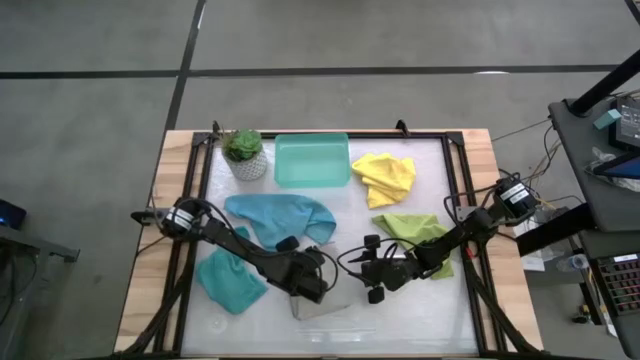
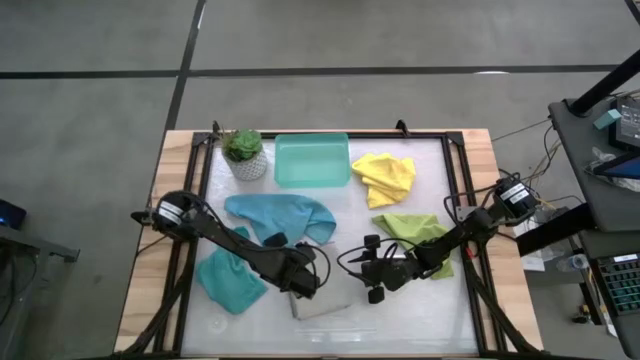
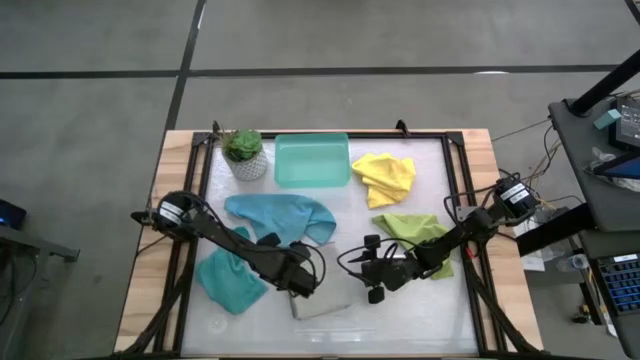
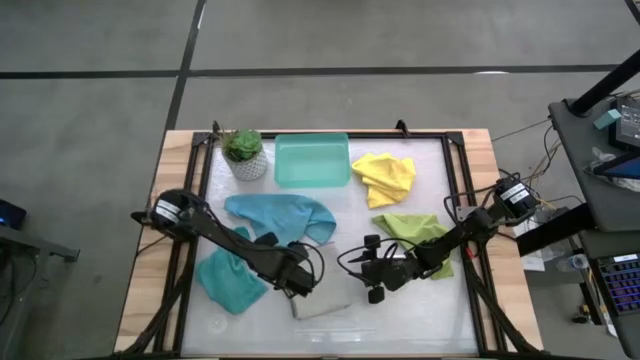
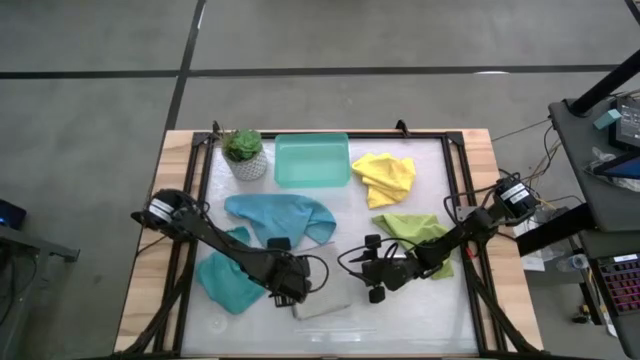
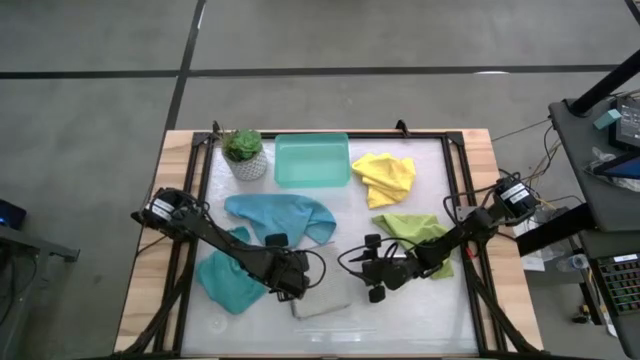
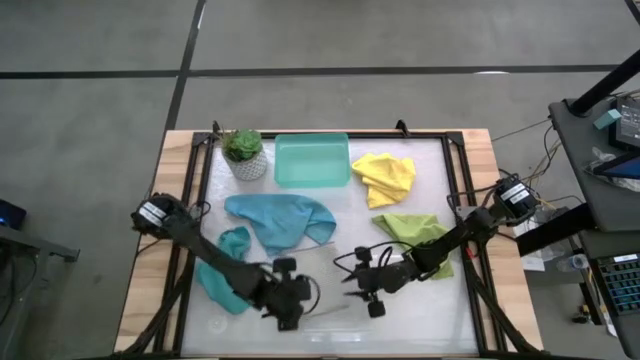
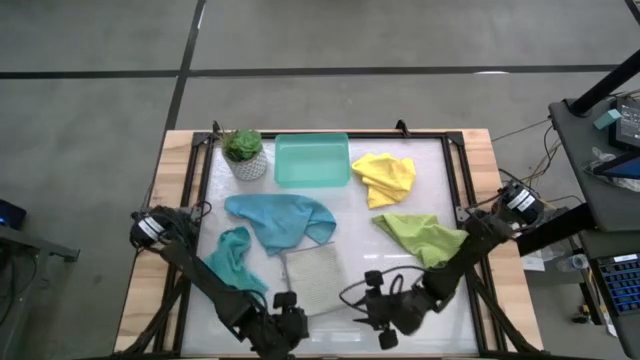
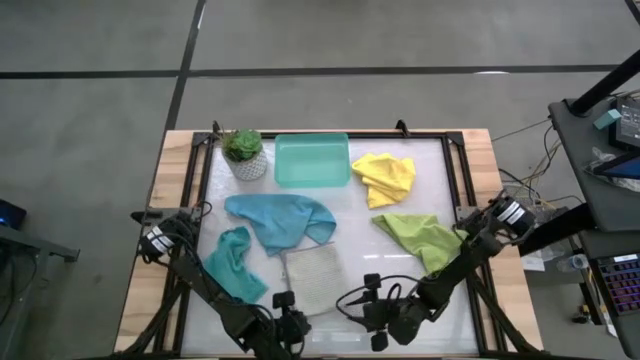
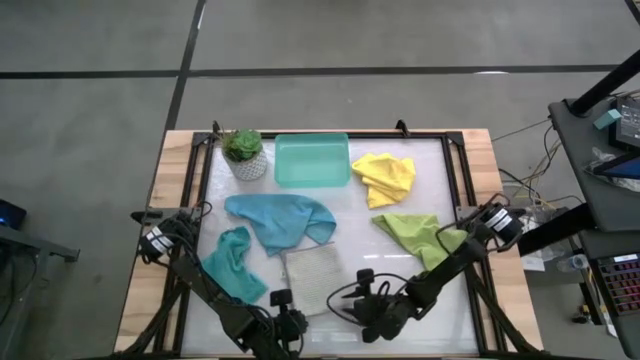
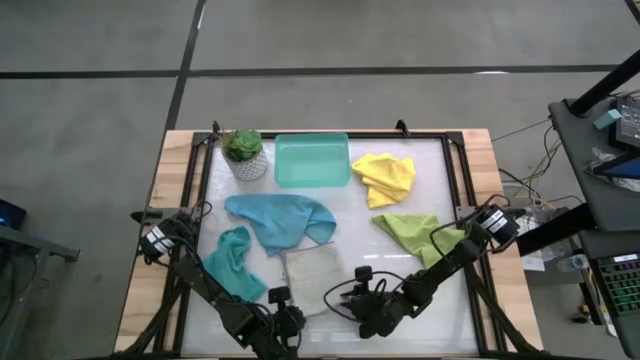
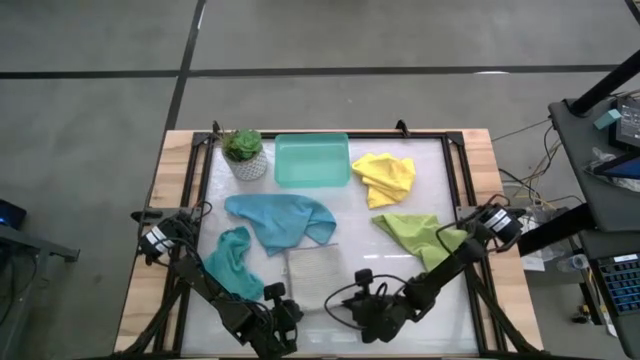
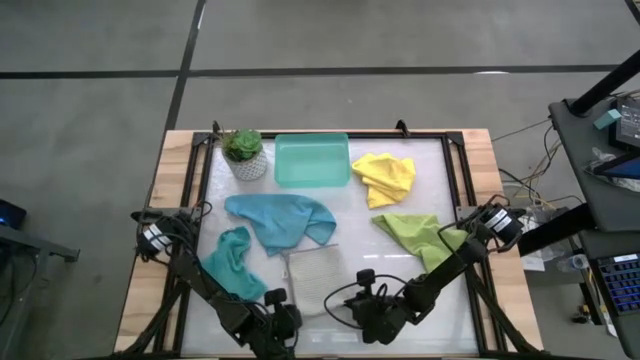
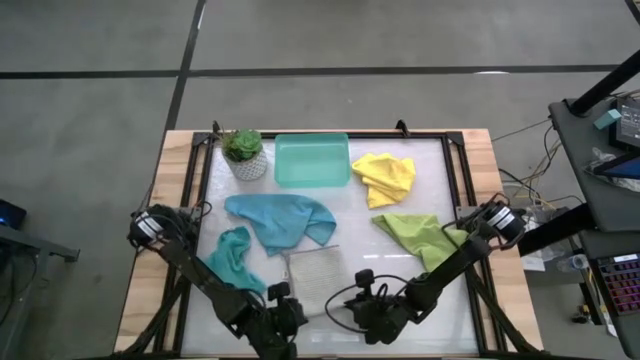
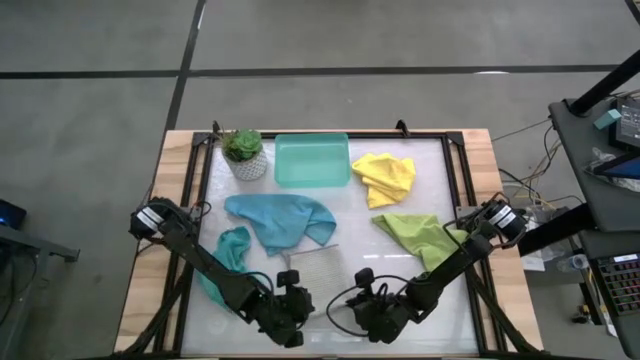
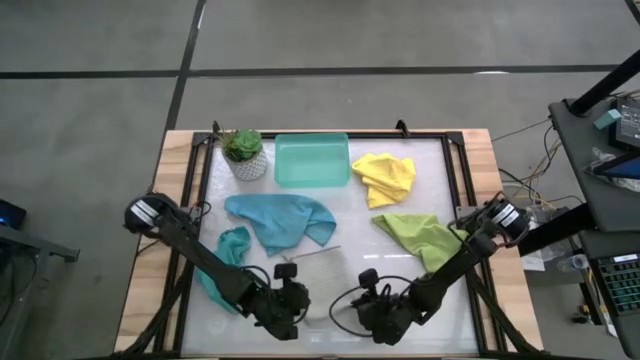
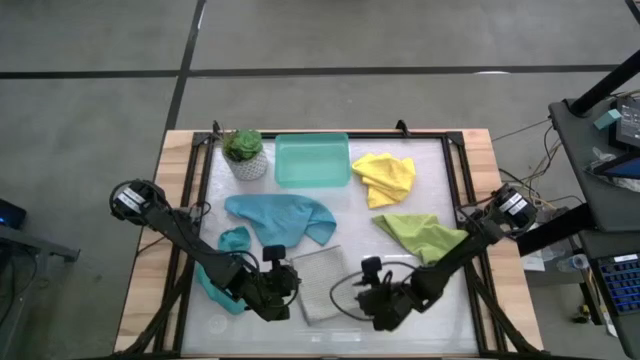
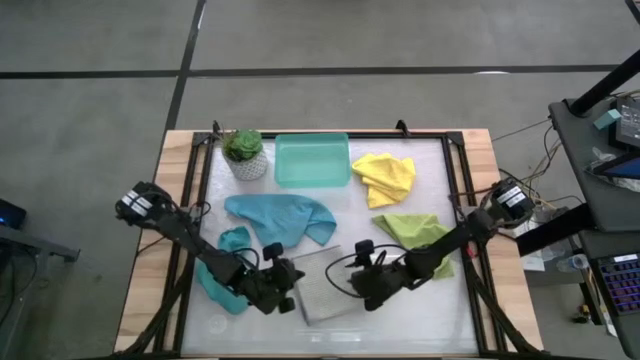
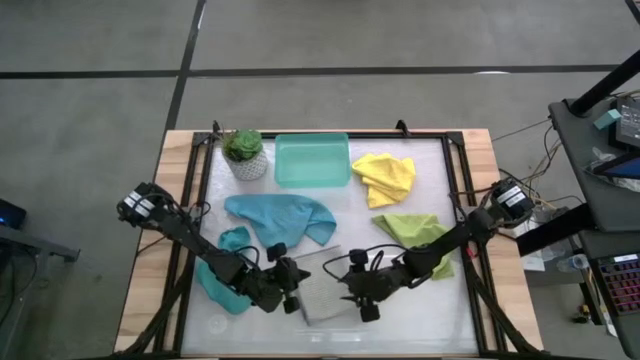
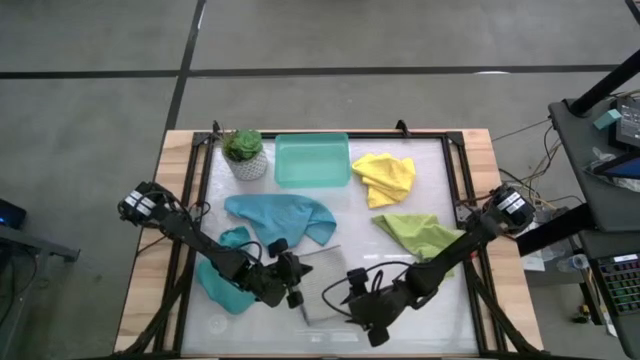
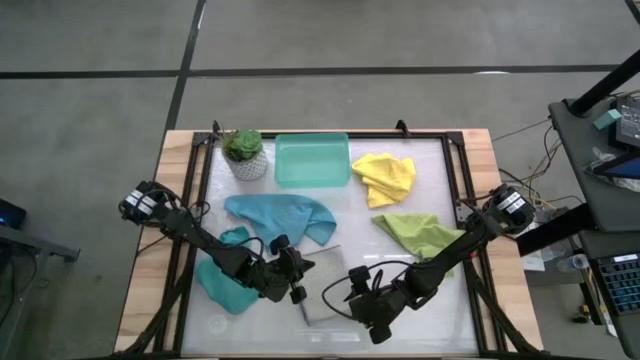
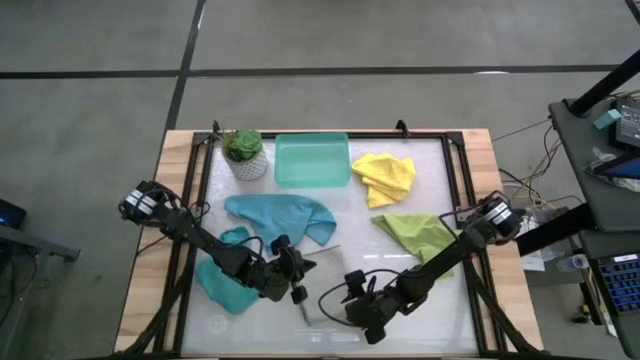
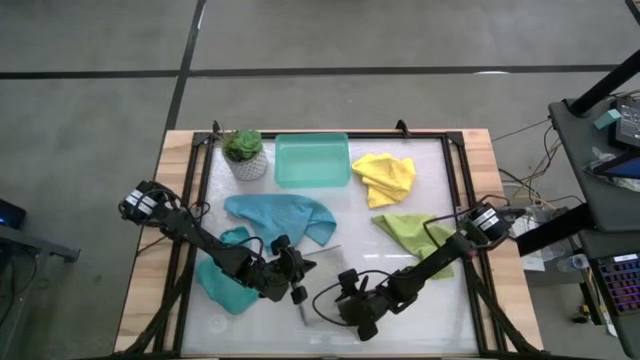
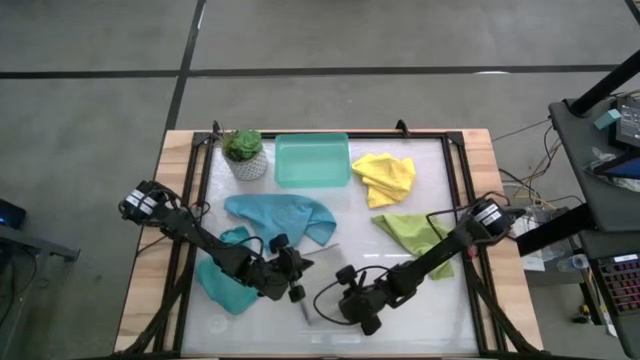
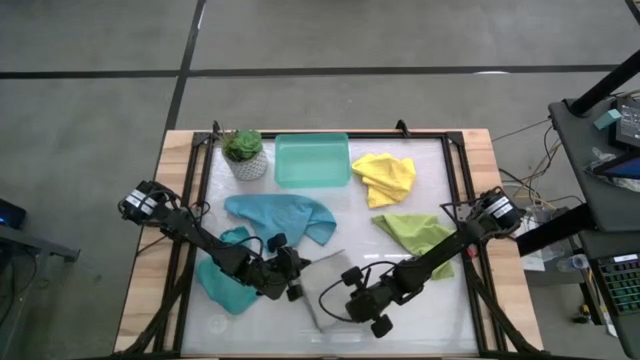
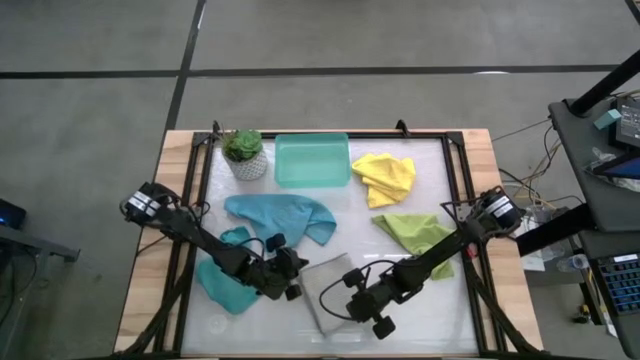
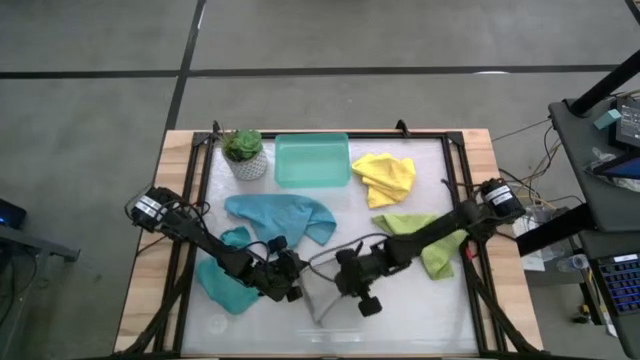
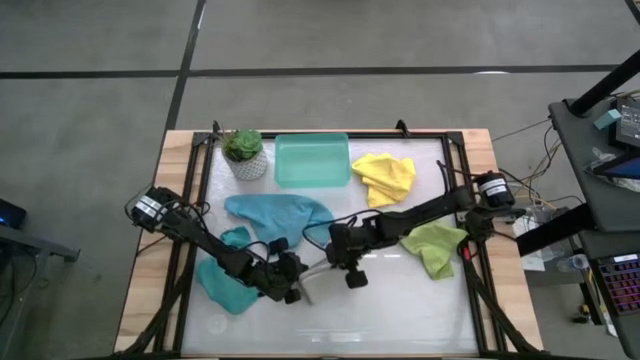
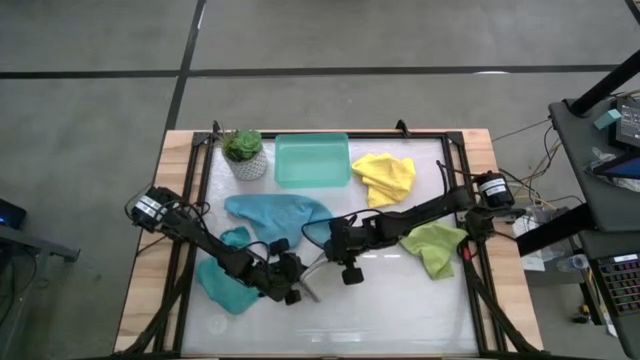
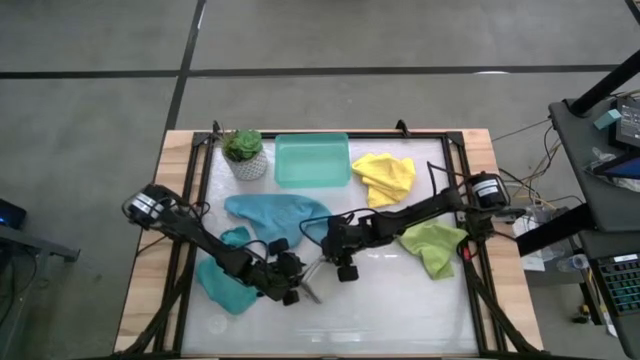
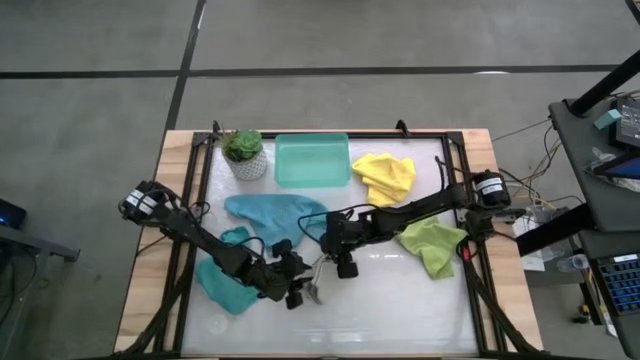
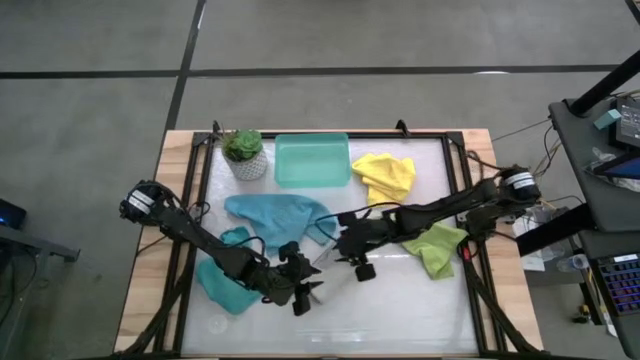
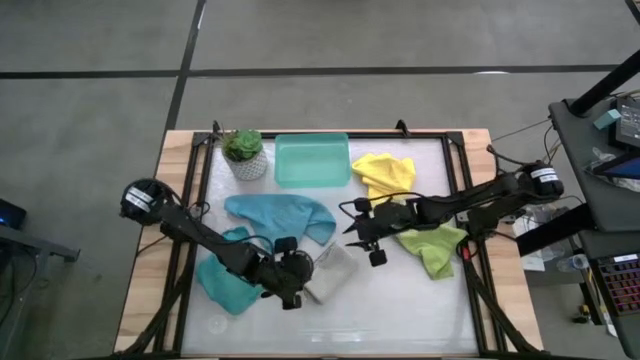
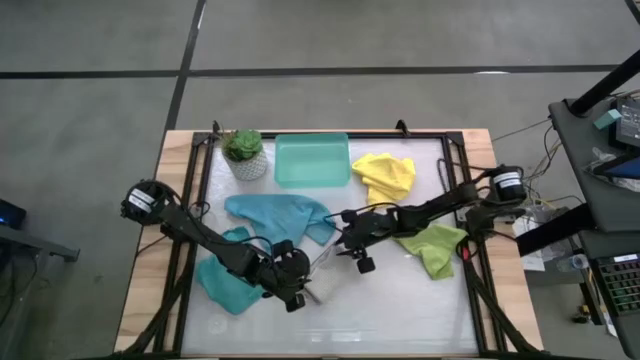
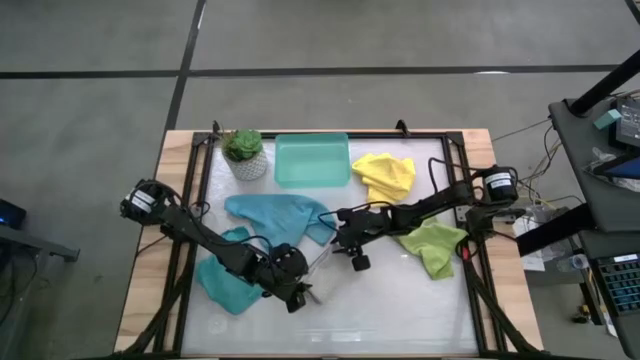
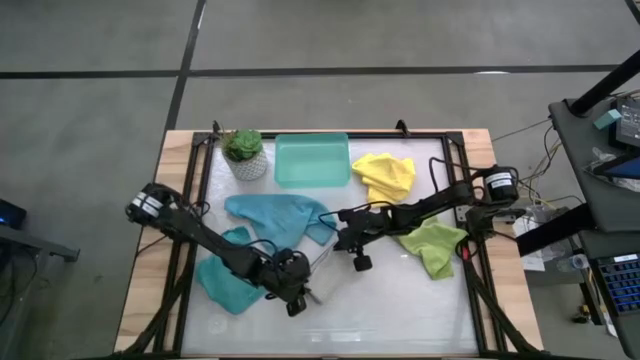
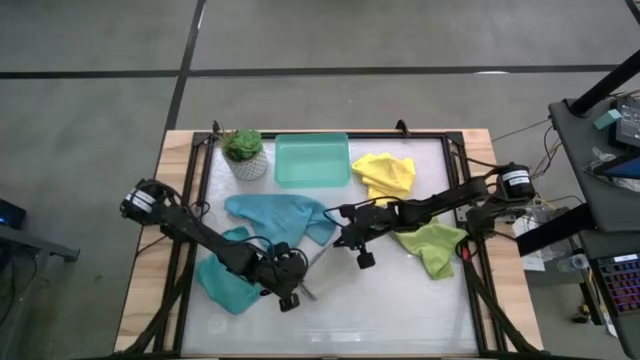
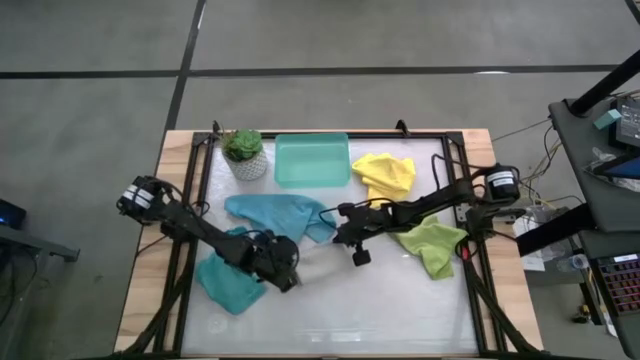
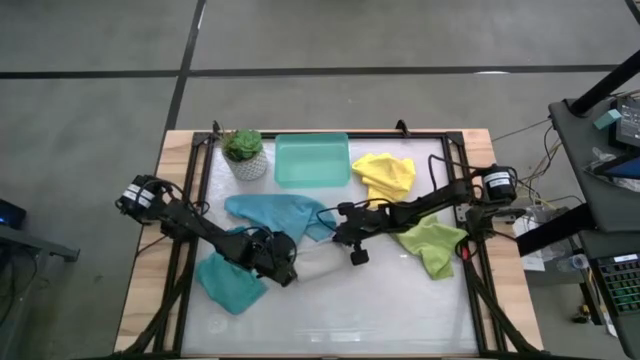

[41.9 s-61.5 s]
Task: Fold microfiber towels
Fold the gray microfiber cloth

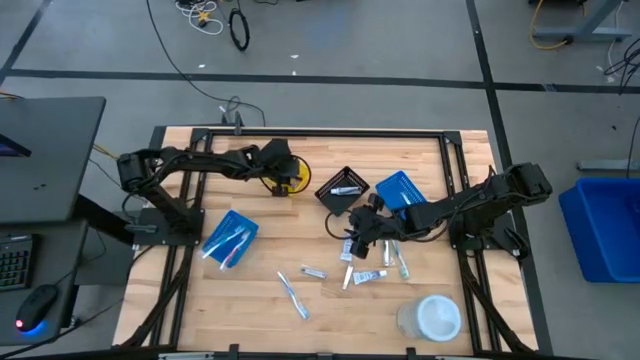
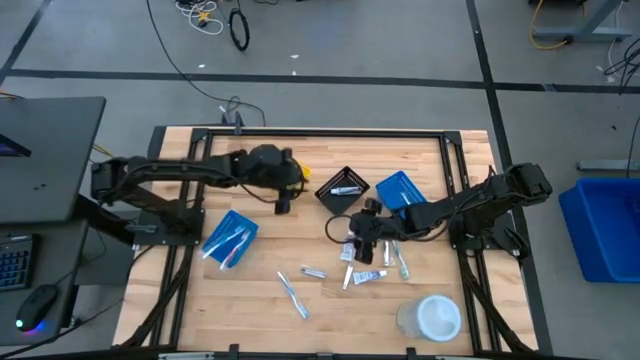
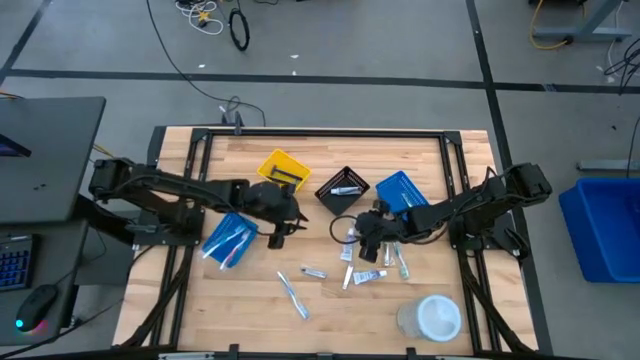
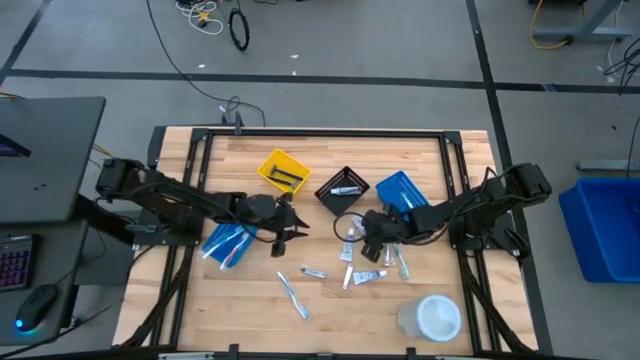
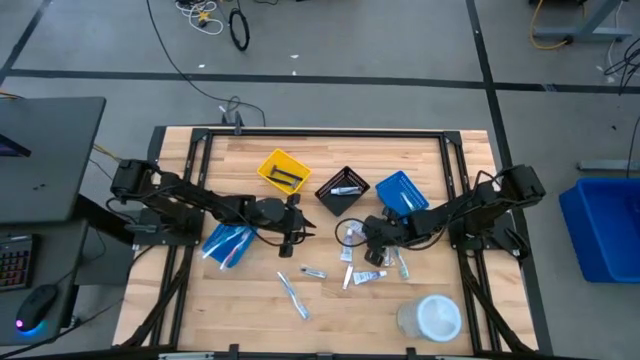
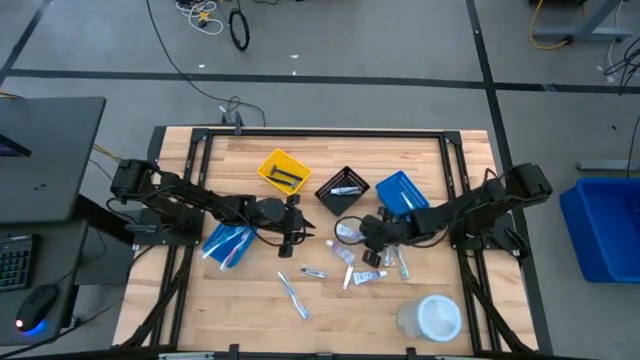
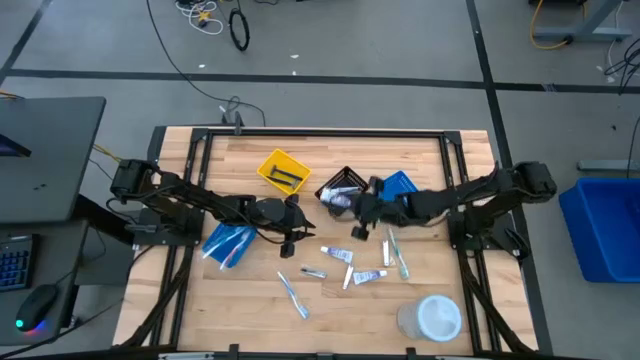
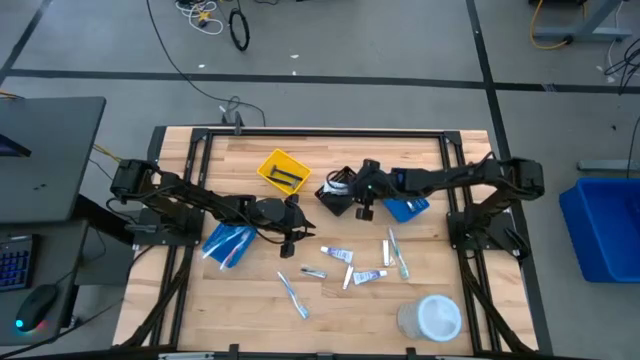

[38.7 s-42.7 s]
Task: Pick & Place Travel size toiletries
Put the white toothpaste into the black bin
